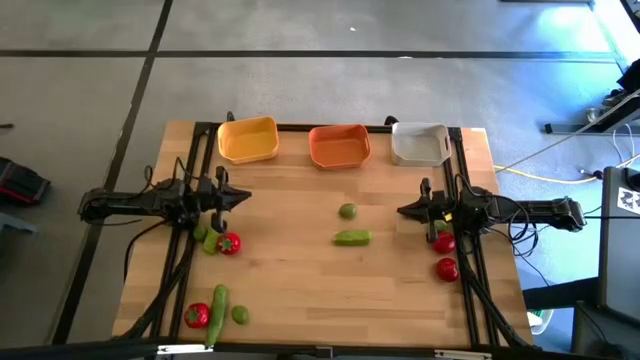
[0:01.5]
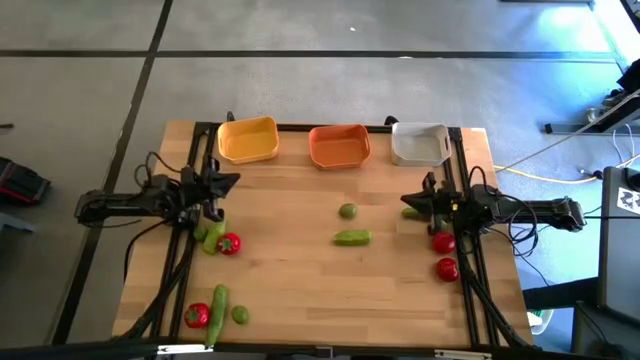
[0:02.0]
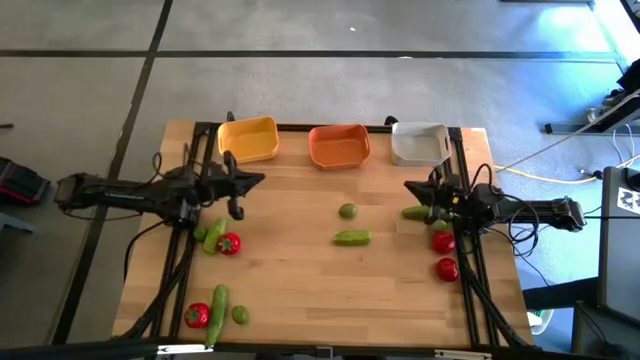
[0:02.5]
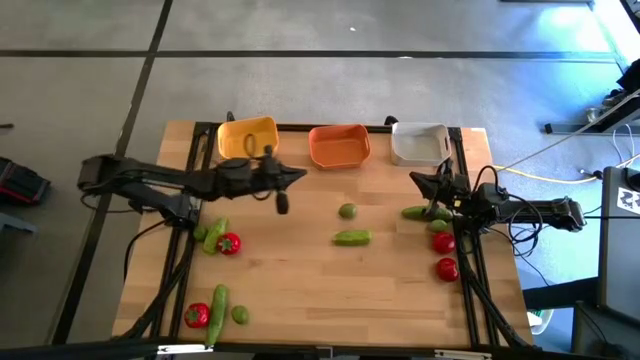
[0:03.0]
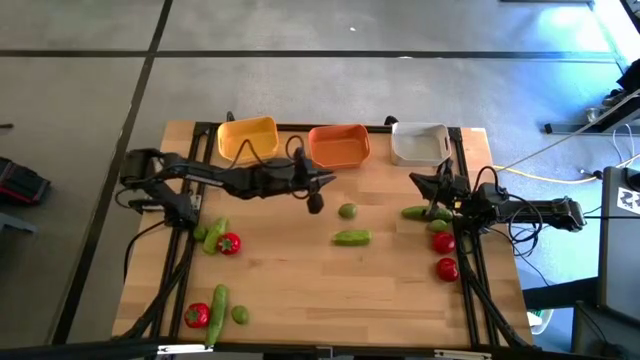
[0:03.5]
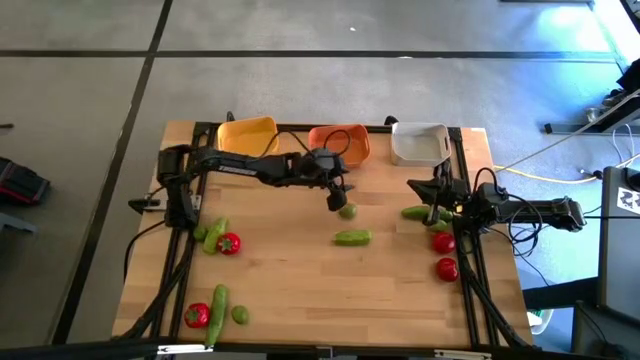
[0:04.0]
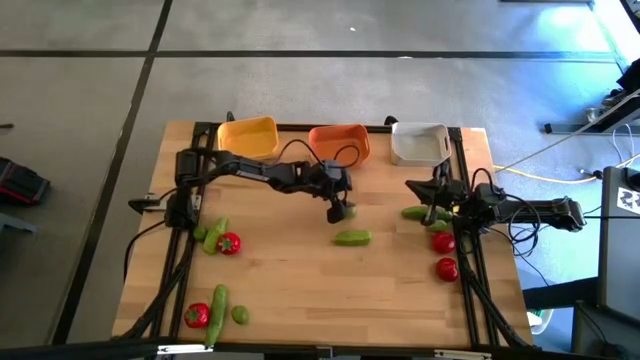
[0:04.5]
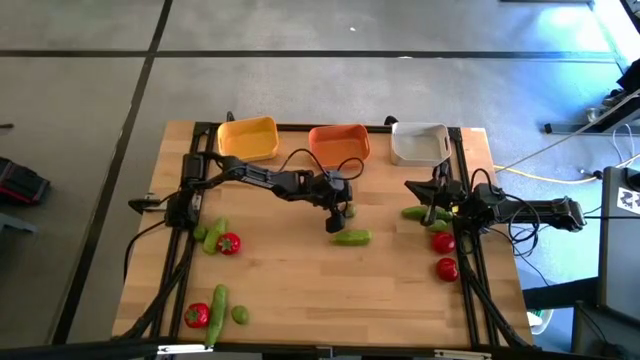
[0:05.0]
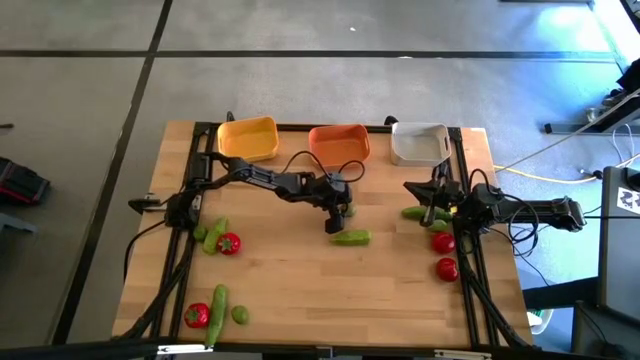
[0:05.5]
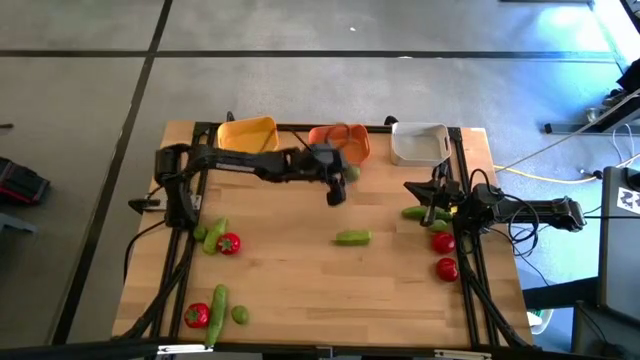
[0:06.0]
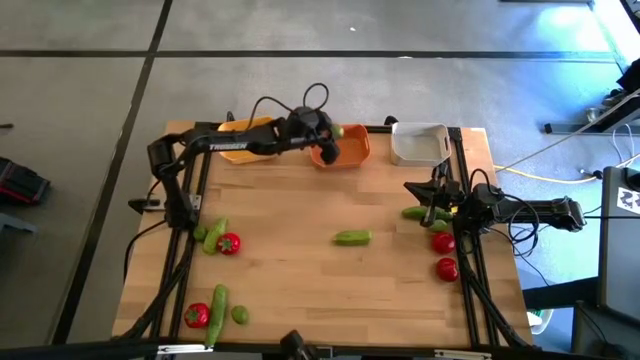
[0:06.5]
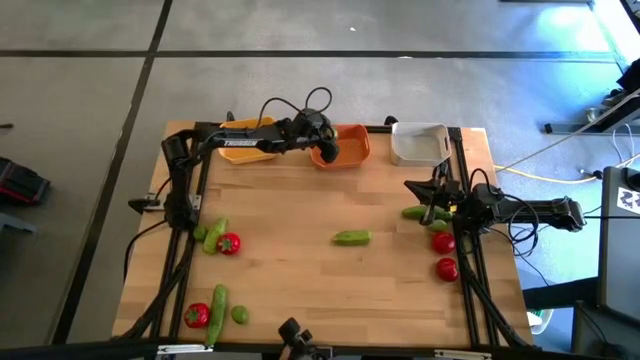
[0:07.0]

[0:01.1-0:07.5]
Task: Sort produce into baskets
Put the top center lime into the orange bin

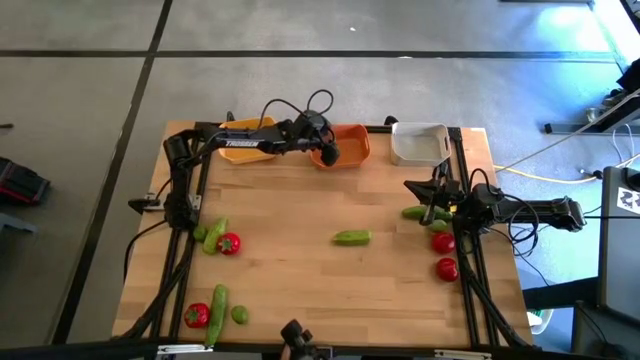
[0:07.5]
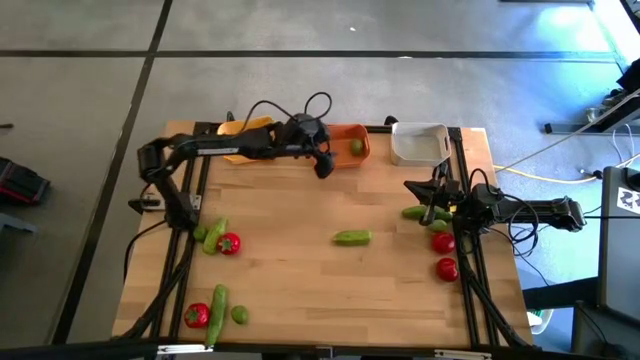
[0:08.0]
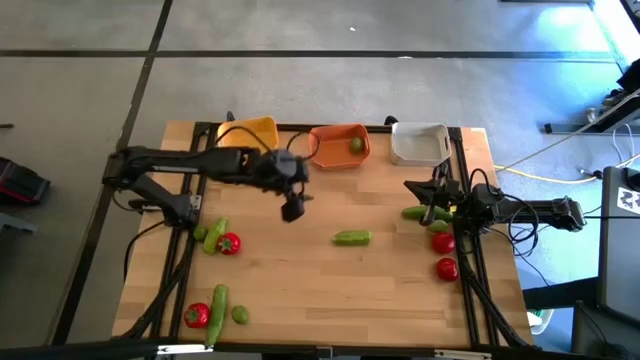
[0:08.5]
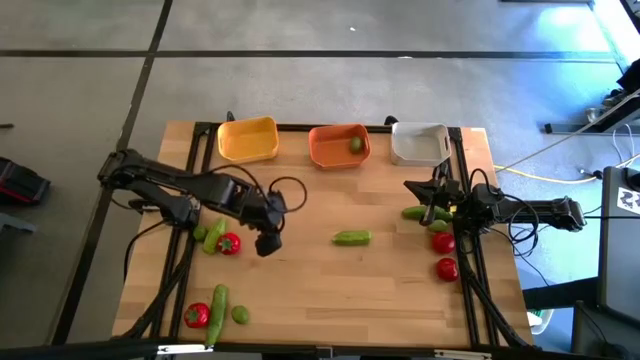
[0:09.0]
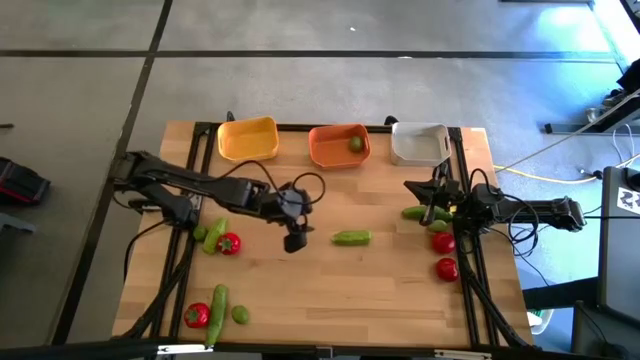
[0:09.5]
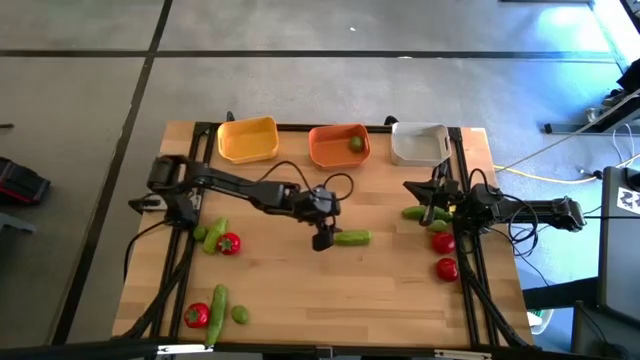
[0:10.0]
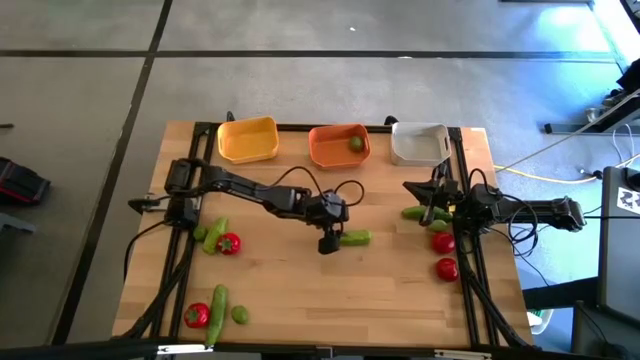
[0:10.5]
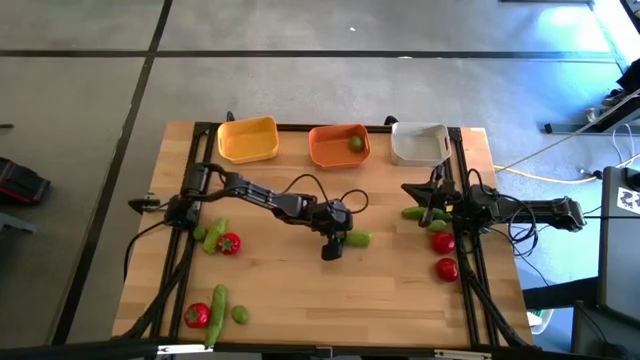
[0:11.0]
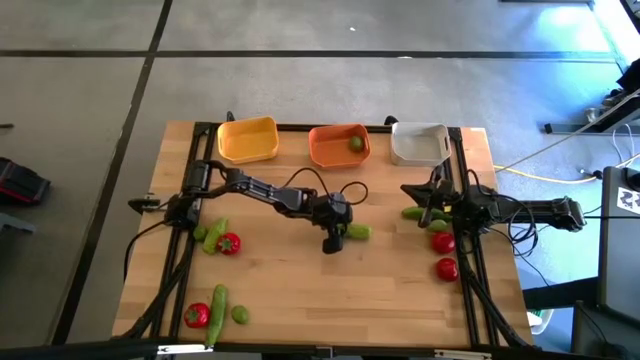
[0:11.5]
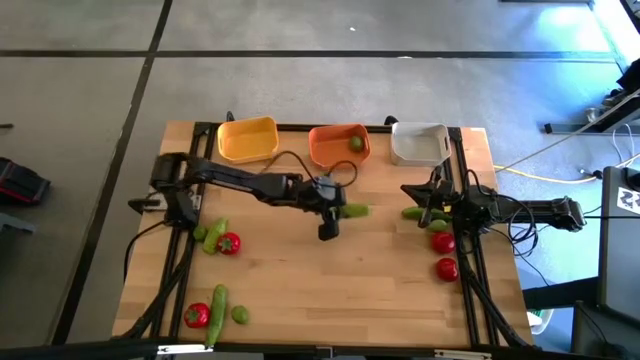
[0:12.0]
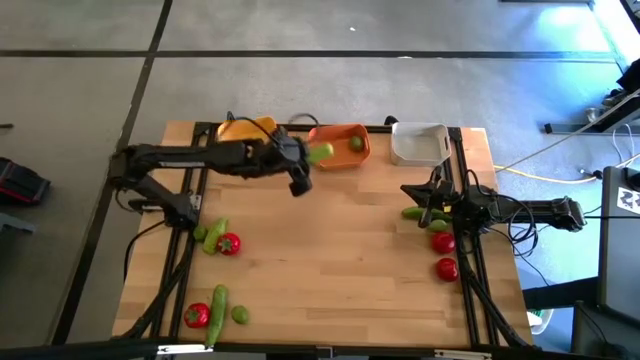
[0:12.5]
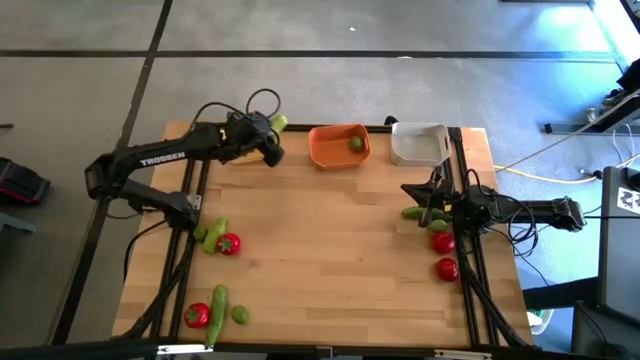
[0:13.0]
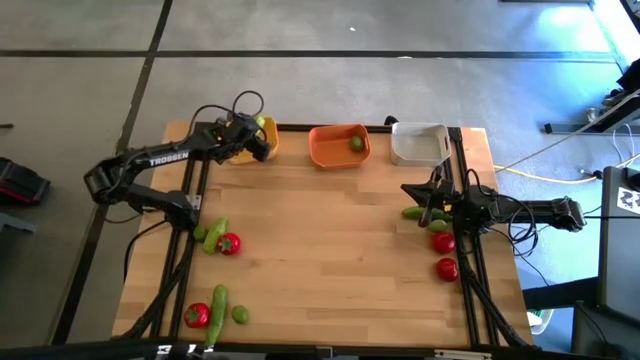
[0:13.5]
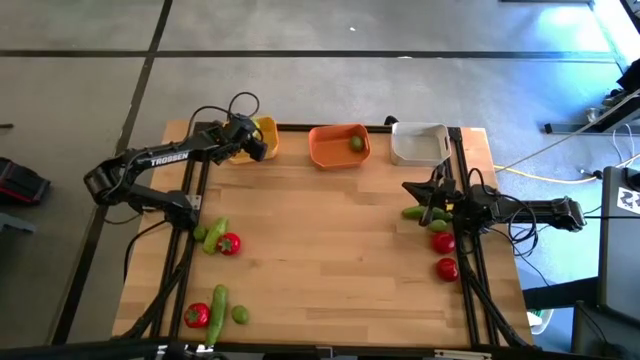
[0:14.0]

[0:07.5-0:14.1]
Put the top center cucumber into the yellow bin

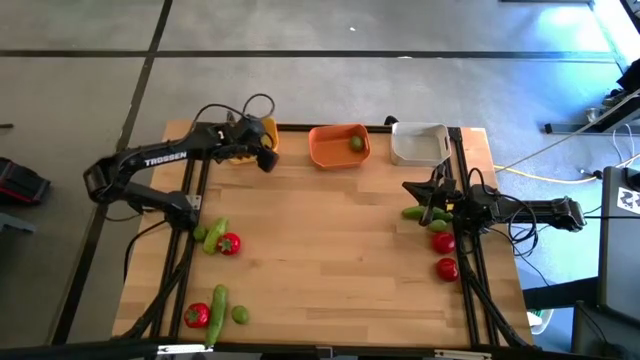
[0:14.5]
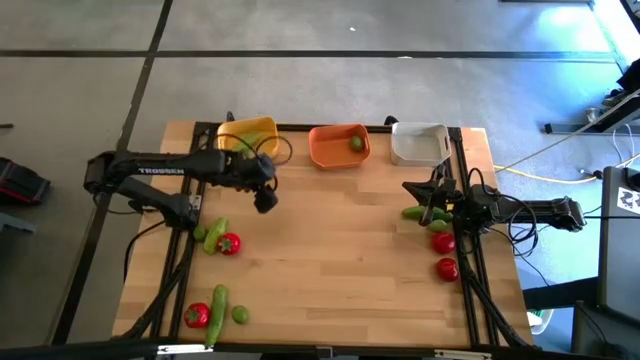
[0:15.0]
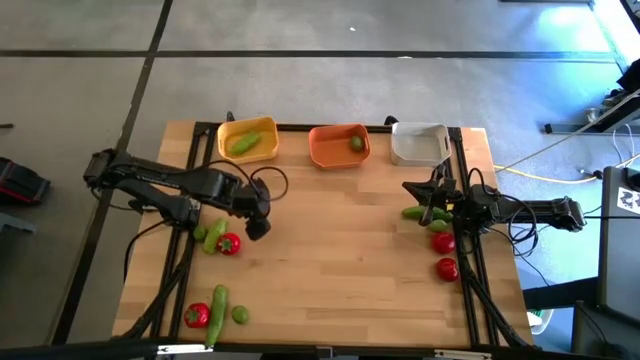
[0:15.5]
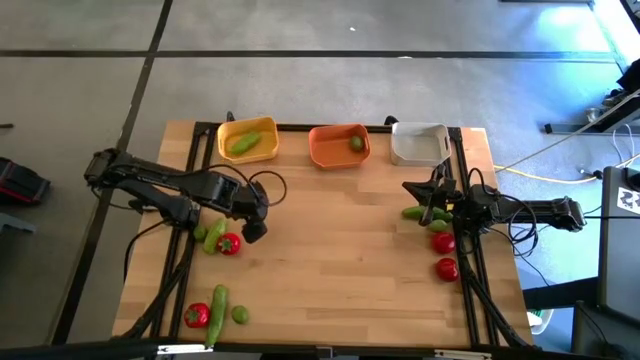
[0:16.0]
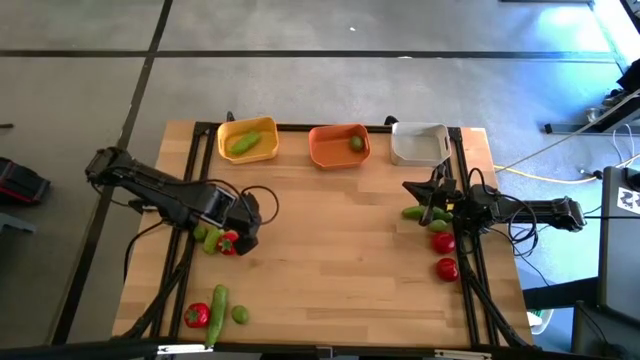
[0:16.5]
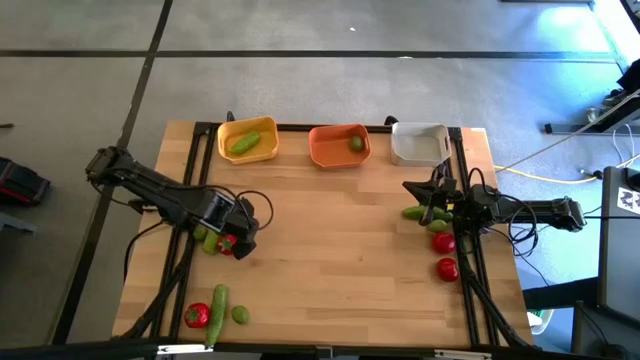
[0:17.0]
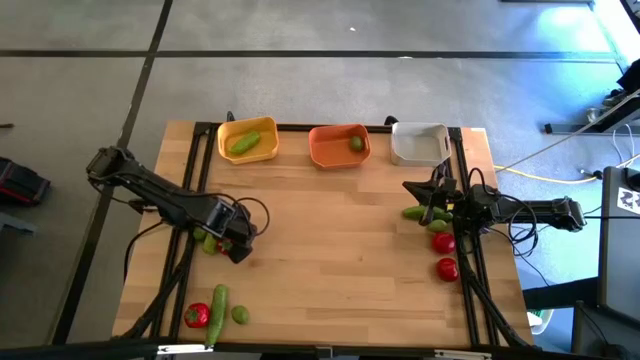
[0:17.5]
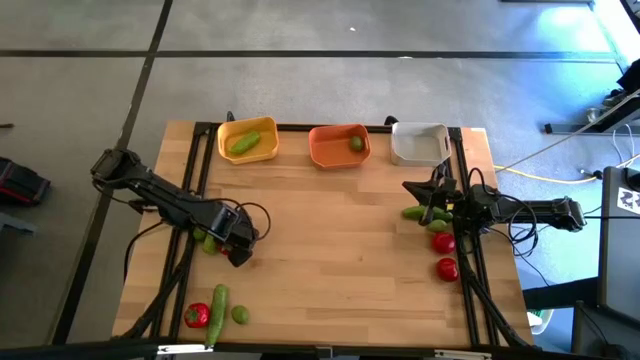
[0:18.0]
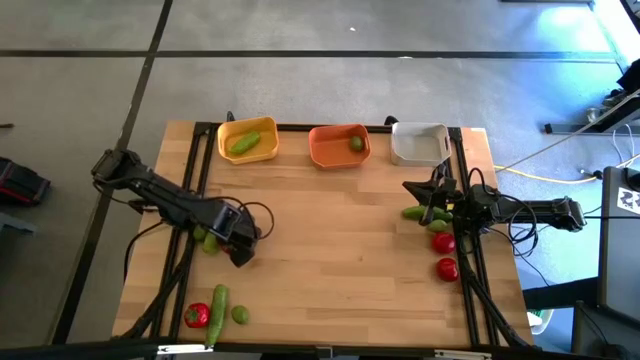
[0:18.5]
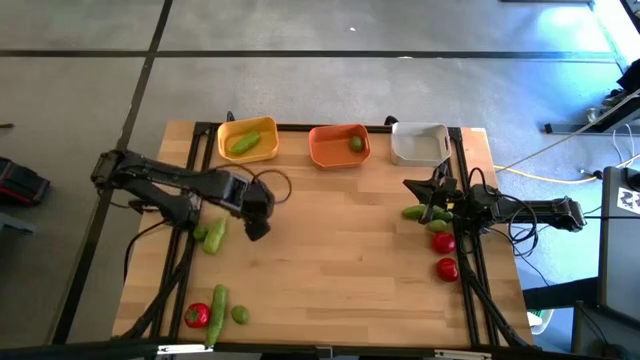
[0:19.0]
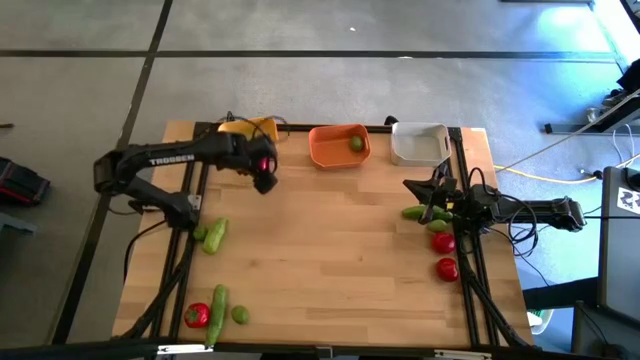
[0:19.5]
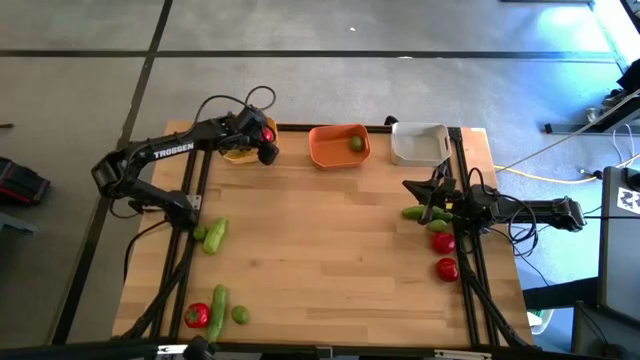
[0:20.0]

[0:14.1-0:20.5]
Put the top left tomato into the yellow bin

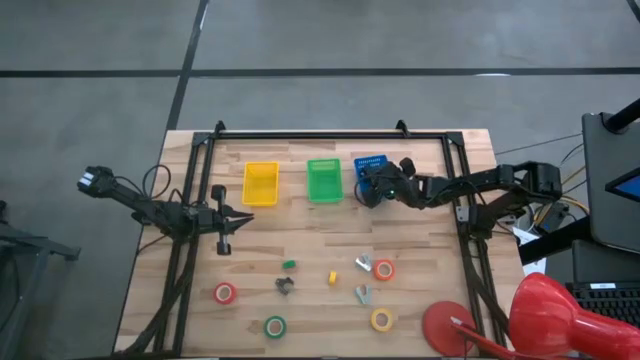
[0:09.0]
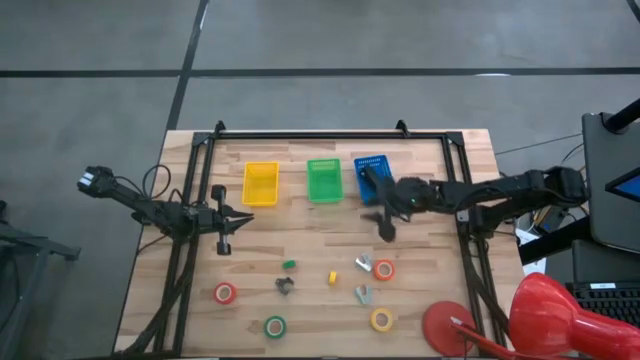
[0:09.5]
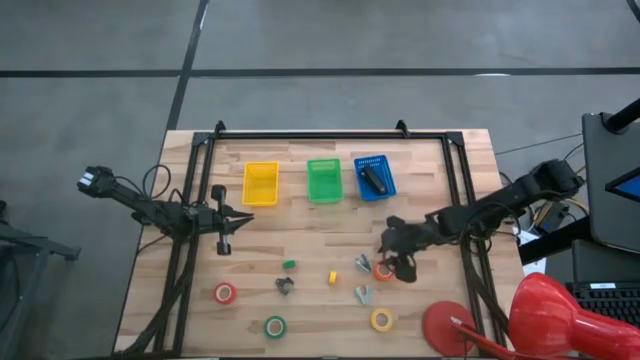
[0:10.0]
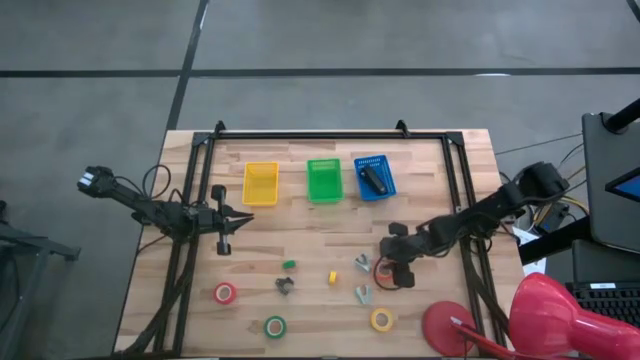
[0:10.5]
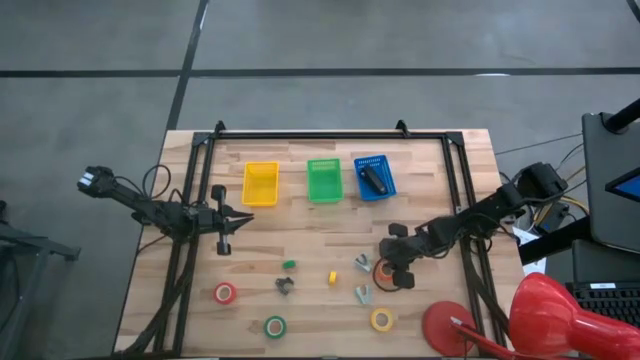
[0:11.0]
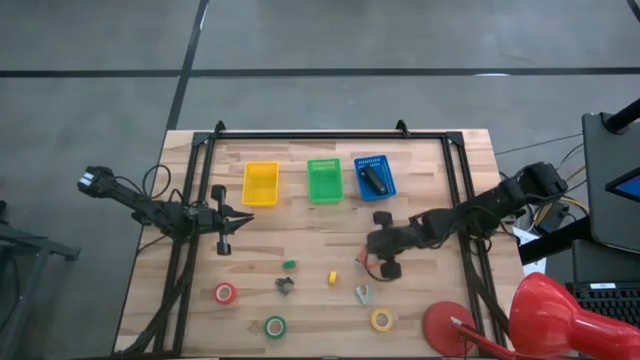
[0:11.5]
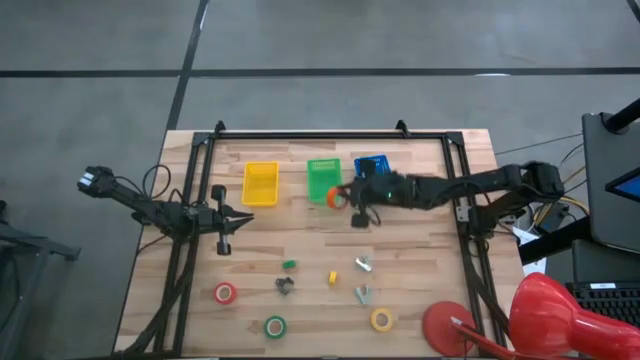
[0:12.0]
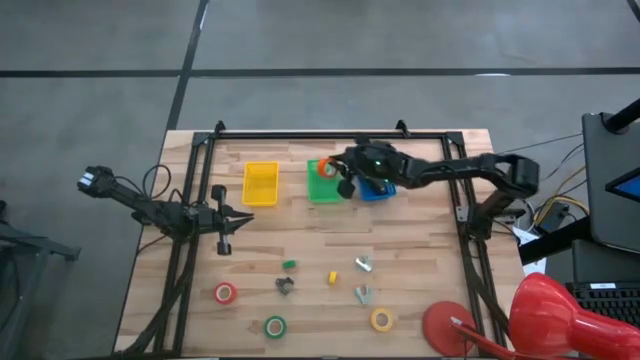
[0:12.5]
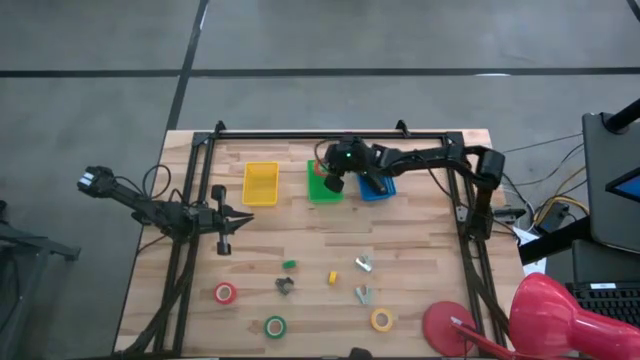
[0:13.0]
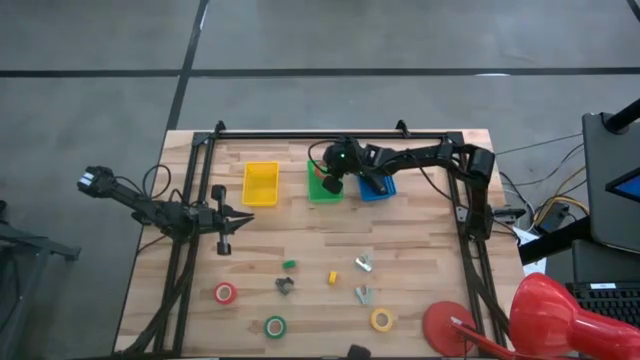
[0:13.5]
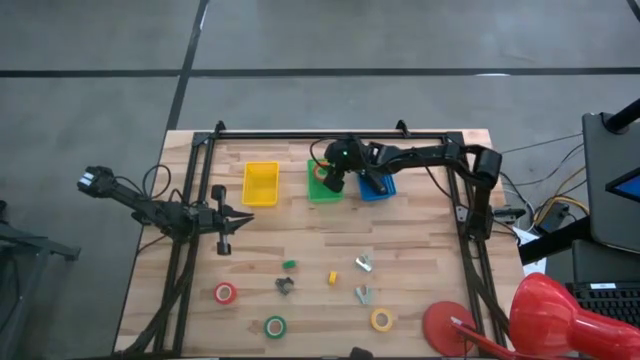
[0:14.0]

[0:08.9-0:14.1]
Task: Pick and place Stapler, Stapler remover, tape
Put the orange tape into the green bin
